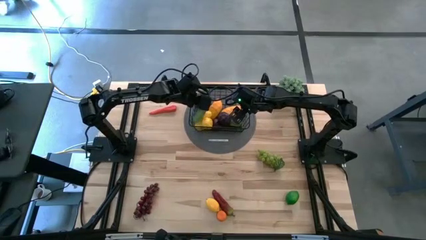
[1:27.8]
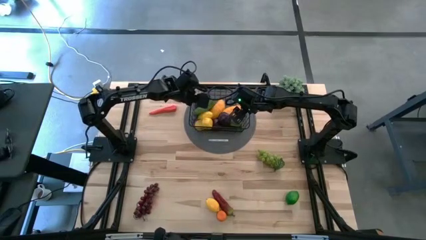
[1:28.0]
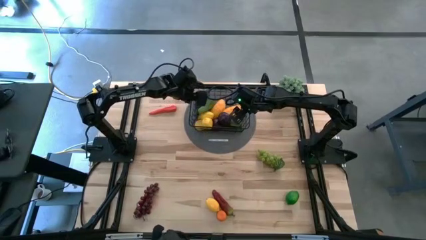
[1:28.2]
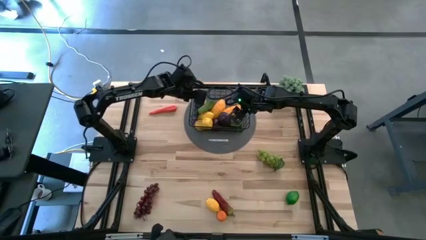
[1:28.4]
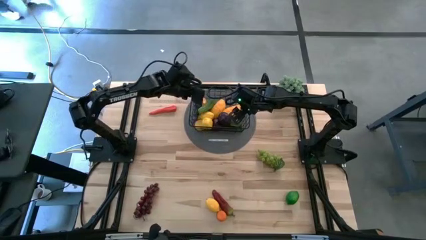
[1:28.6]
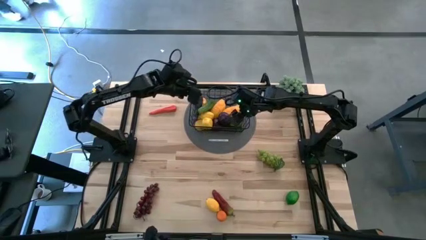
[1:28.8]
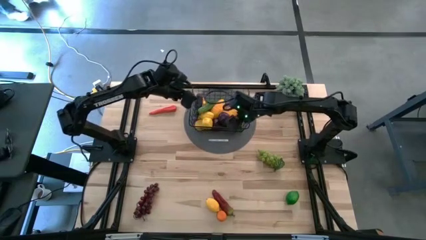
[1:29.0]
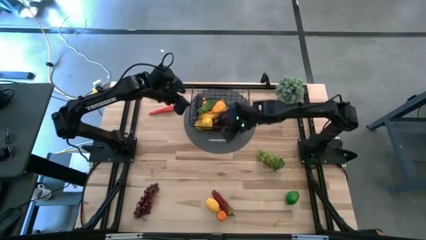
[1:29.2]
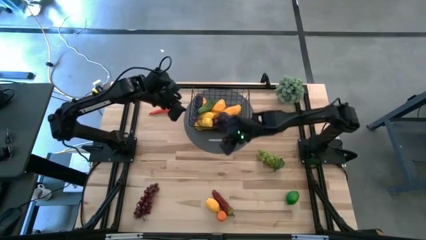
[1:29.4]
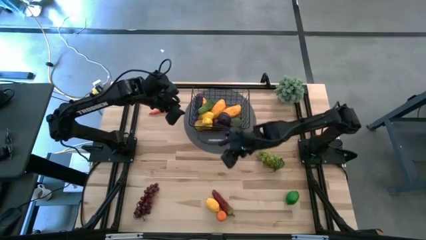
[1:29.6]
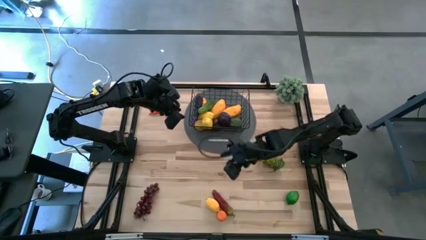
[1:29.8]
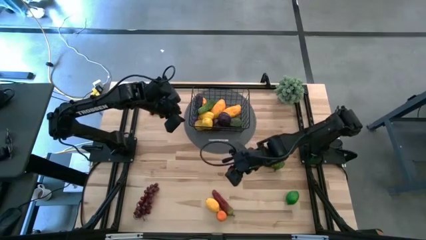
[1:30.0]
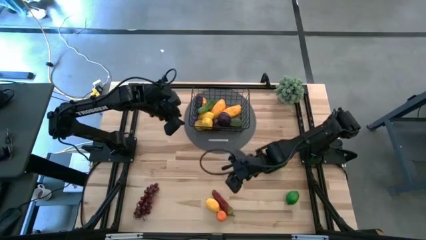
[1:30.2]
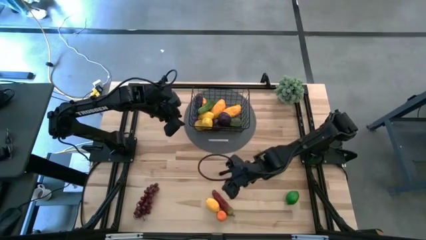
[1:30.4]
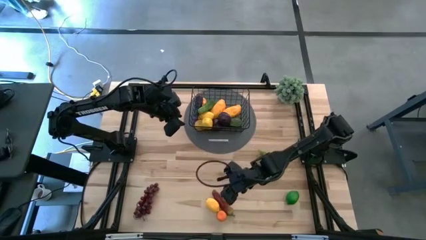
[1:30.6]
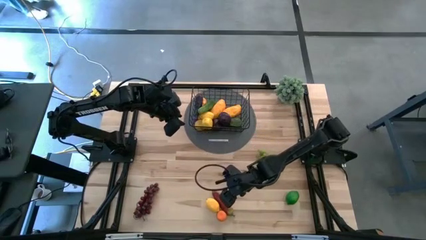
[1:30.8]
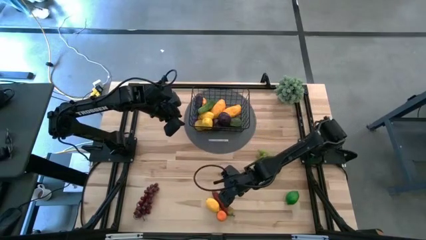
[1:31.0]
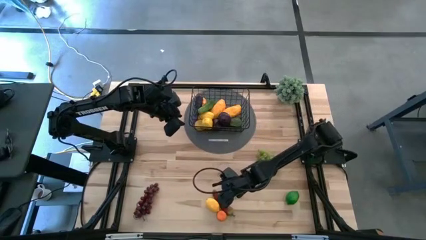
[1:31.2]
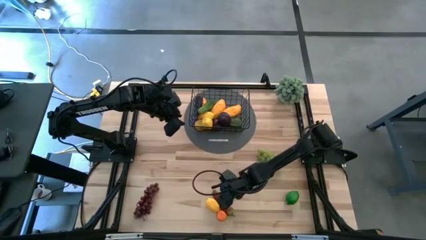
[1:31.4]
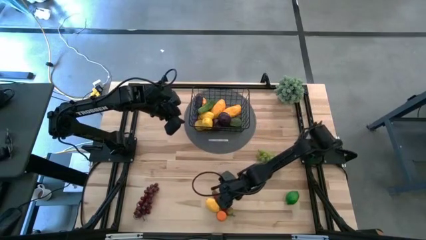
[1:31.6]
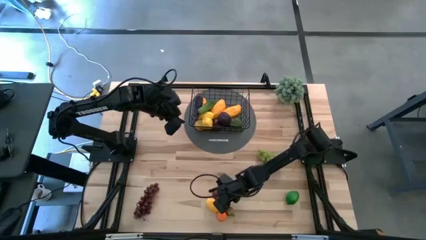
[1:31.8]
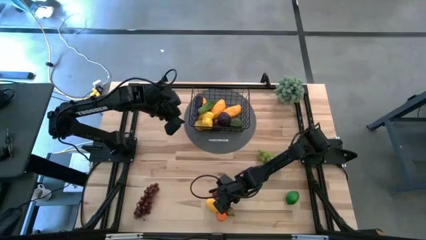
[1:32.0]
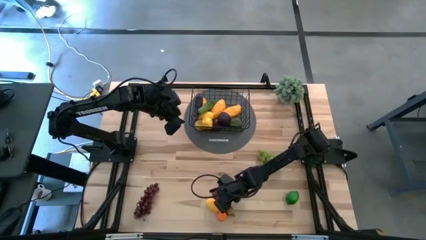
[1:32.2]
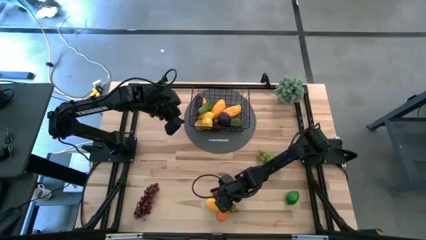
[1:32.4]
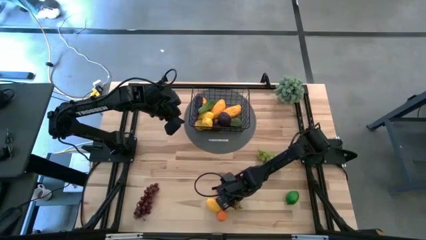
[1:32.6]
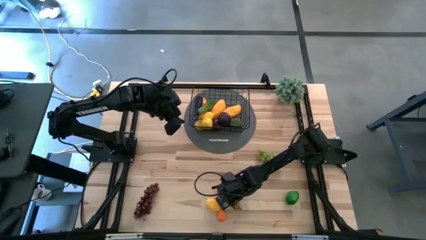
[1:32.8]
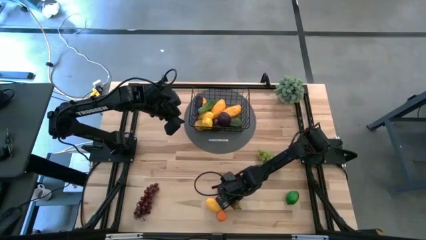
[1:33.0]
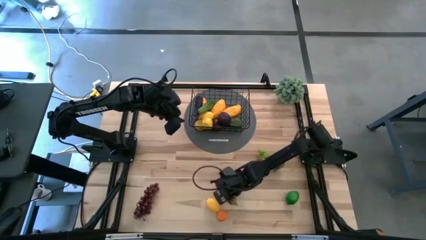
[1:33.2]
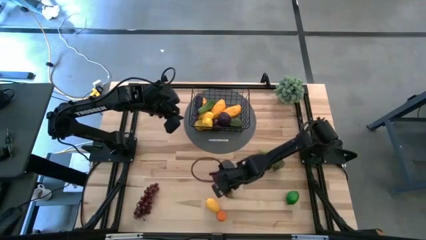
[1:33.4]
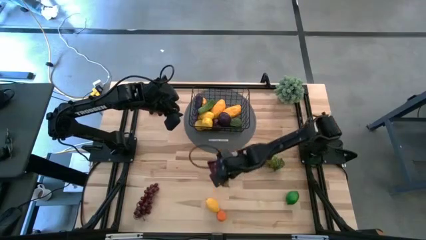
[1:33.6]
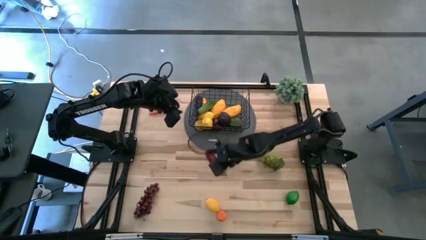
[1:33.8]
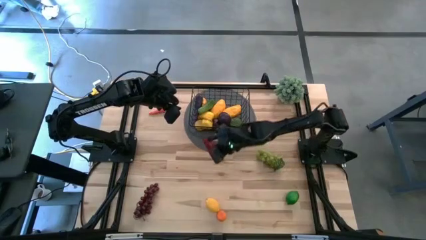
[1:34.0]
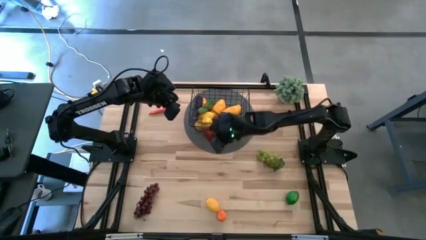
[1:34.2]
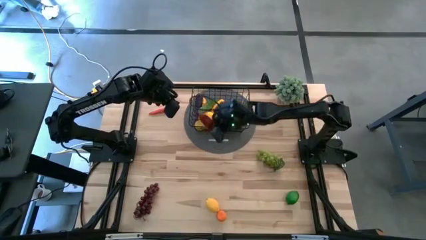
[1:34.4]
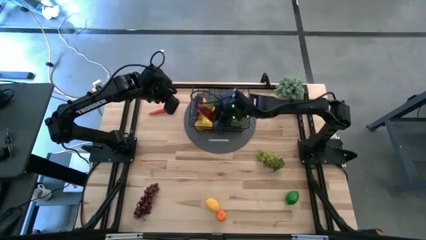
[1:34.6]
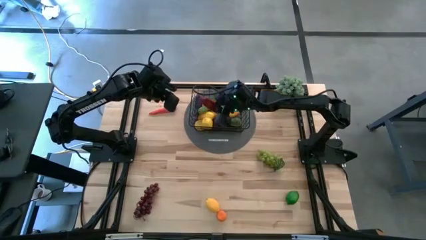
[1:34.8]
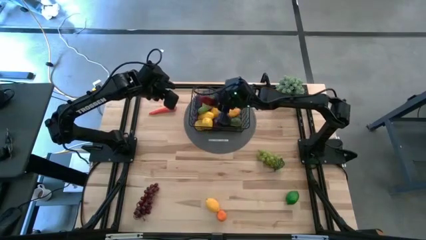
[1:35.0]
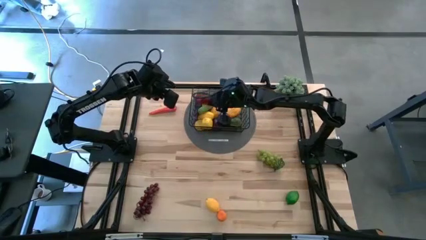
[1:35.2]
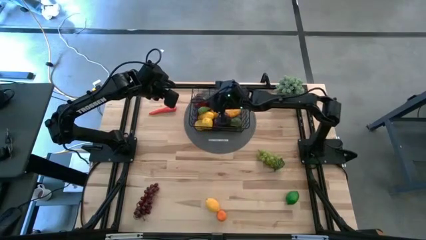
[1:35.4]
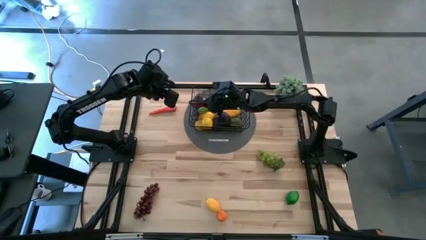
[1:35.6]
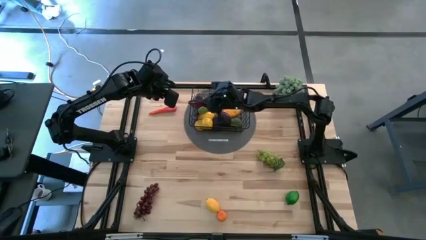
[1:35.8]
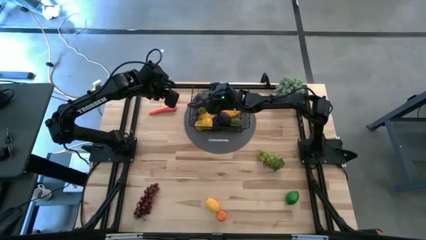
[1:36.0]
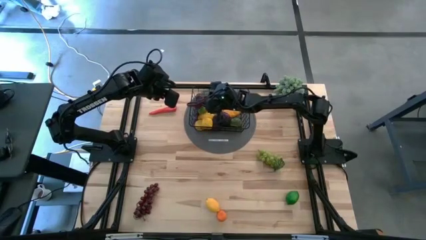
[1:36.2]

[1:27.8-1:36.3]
Task: Build produce basket
Put the red chili pepper into the black wire basket

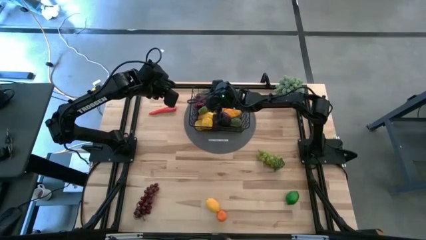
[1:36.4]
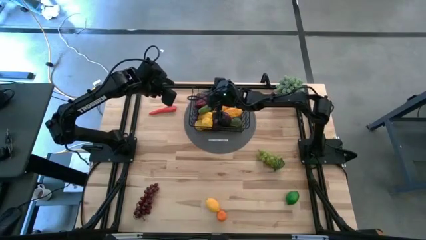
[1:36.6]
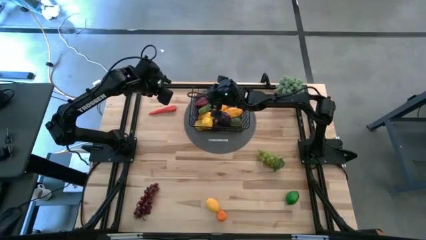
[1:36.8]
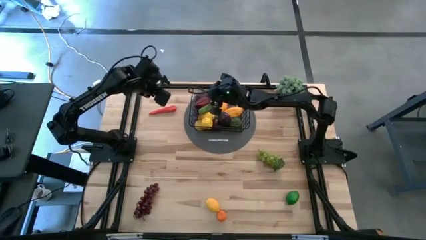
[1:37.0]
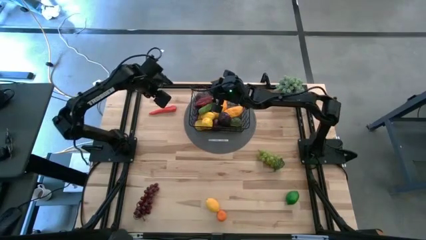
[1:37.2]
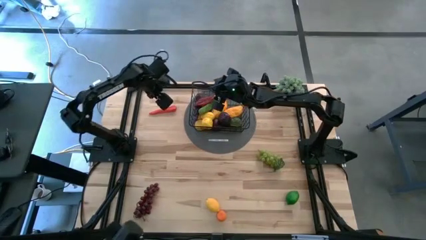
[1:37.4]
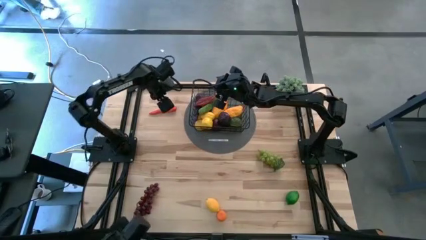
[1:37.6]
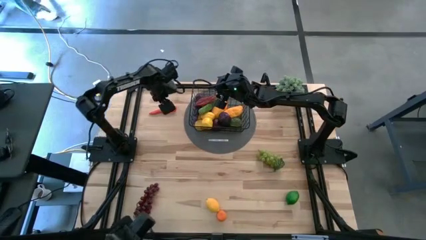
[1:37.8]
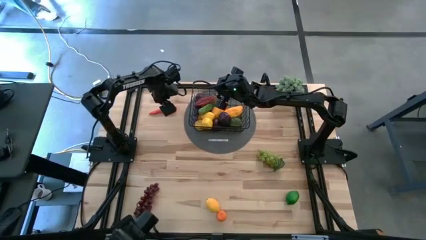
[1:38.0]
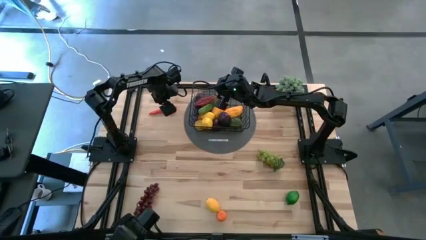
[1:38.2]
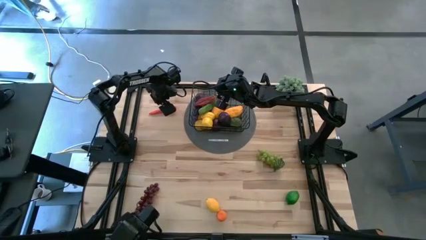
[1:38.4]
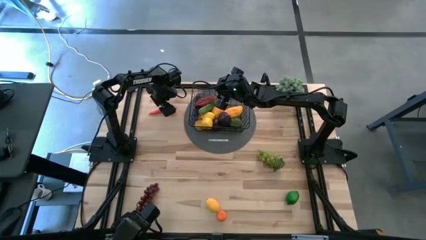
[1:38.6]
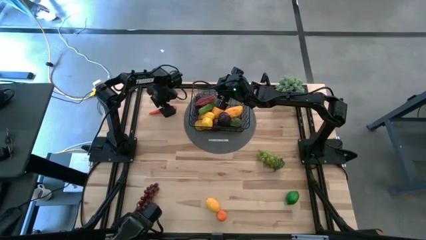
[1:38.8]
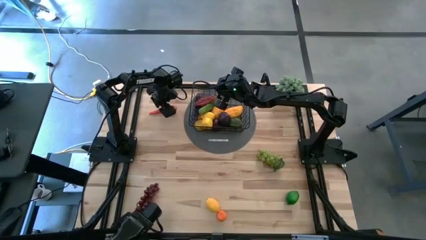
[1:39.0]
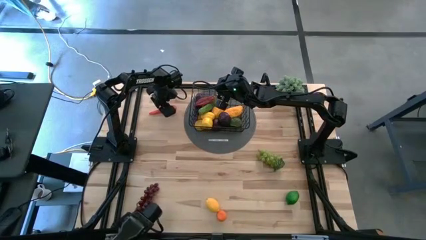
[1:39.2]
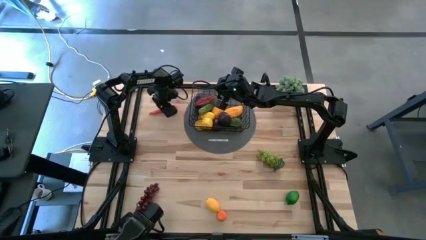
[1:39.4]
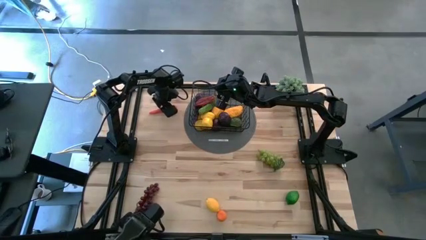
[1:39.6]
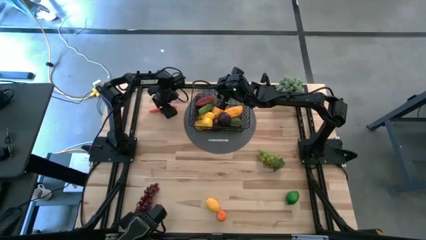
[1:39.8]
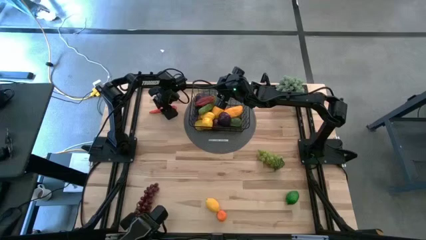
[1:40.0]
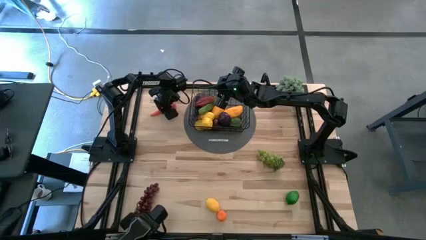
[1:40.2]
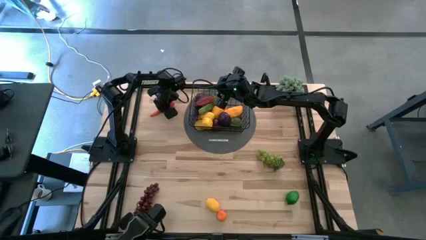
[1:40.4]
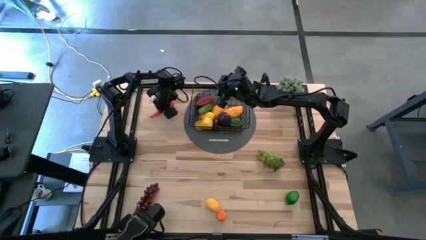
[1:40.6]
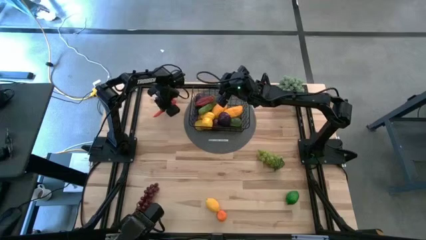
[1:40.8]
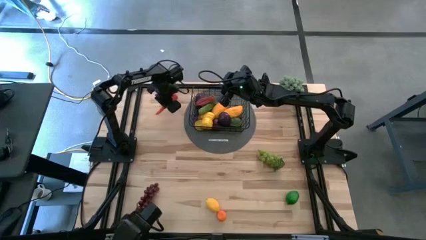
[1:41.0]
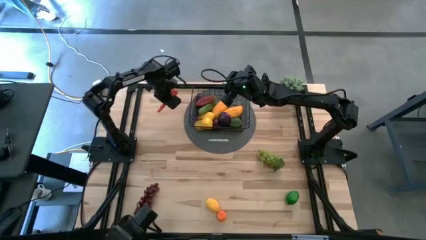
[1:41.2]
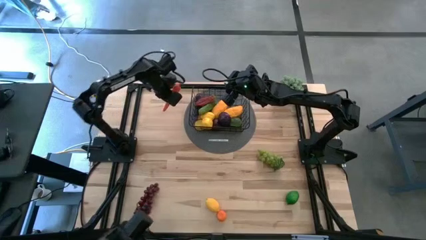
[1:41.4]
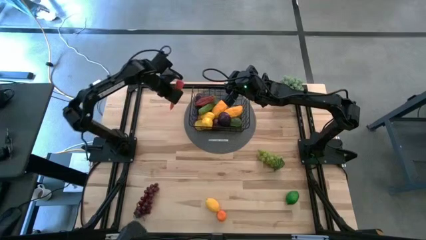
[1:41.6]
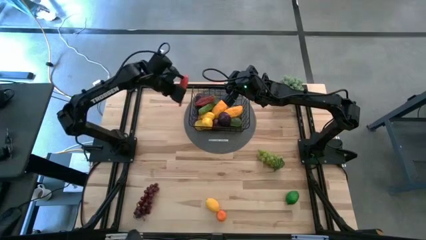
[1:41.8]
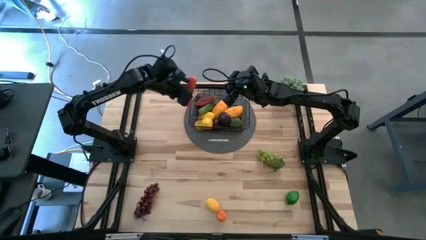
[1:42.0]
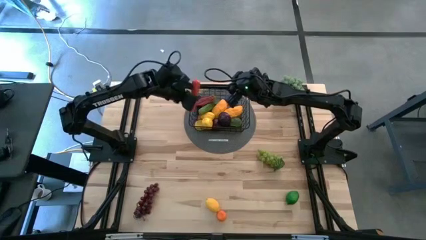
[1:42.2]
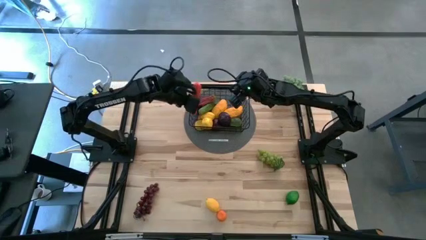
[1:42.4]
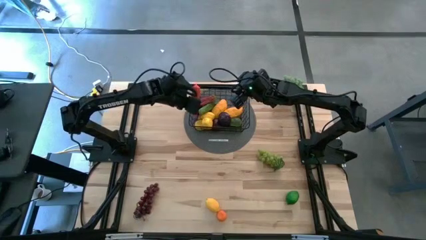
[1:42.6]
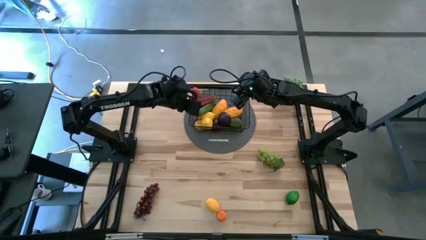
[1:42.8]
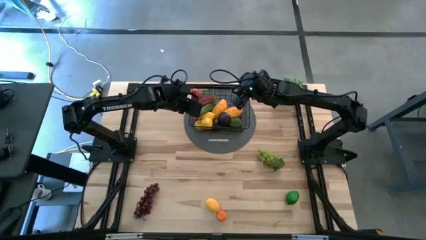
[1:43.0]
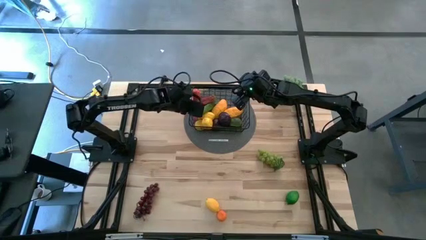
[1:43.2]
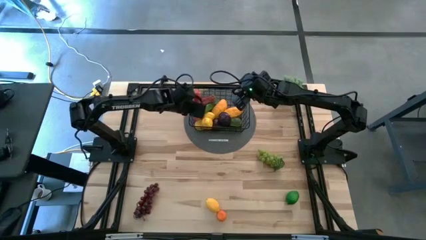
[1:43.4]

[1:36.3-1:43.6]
Put the orange carrot into the black wire basket

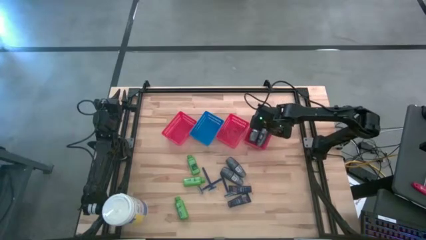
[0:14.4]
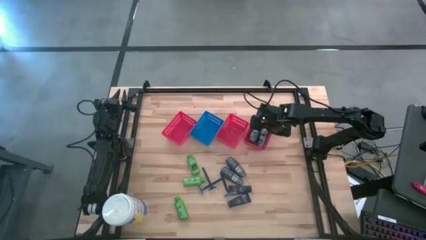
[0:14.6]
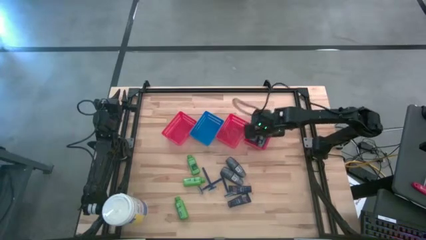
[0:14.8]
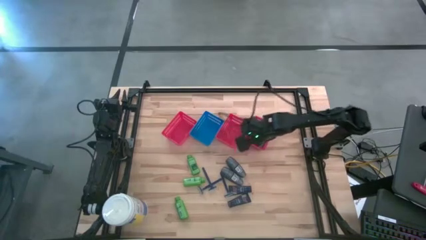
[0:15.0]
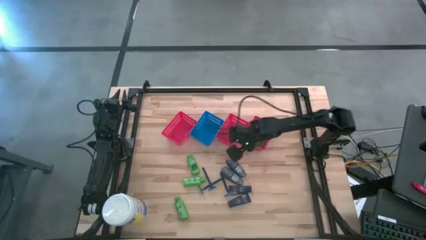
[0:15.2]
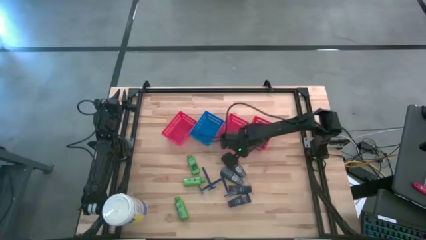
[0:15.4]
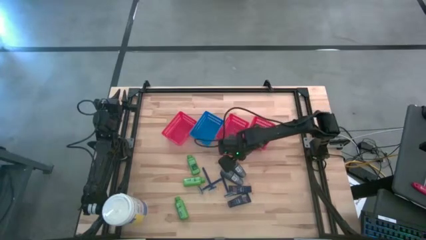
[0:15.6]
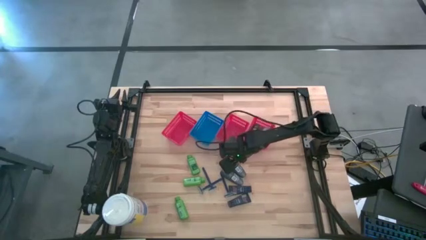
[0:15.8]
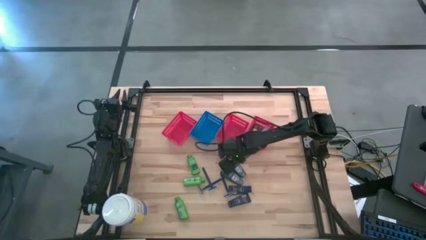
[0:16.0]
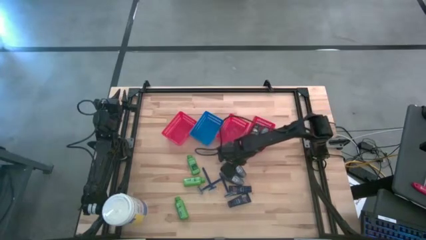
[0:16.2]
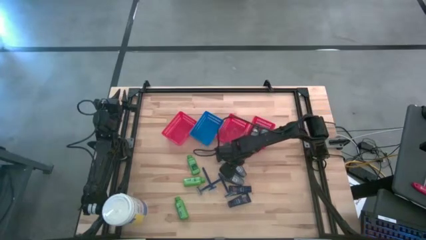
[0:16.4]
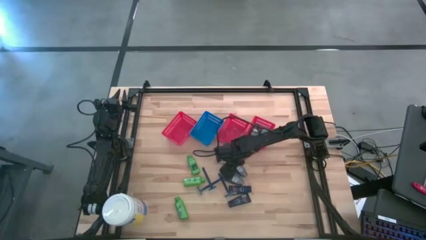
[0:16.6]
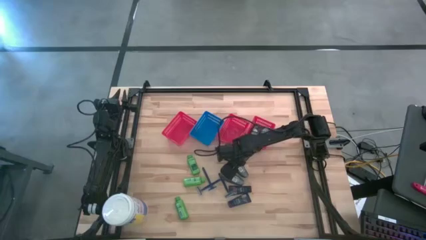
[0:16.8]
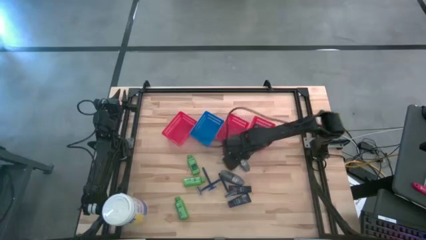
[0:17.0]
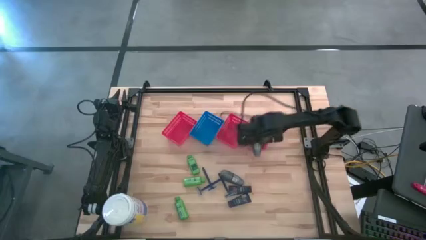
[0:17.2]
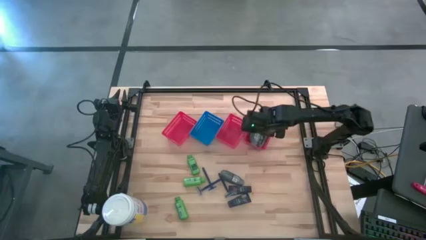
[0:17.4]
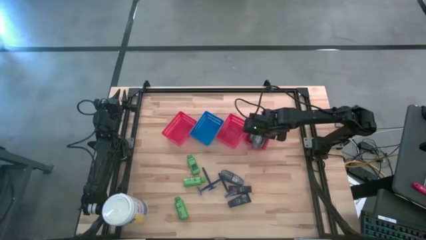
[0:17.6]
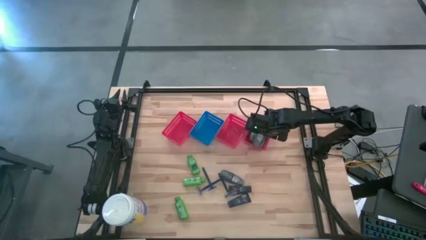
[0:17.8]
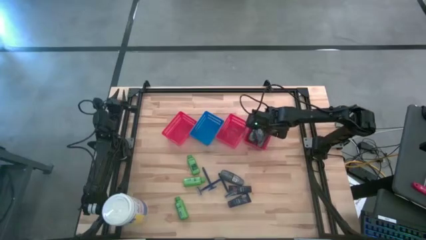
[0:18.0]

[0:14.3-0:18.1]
Task: Pick & Place Travel size toiletries
Put the black deodorant into the right red bin
